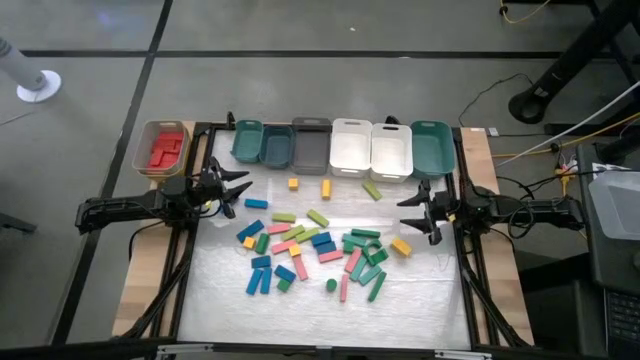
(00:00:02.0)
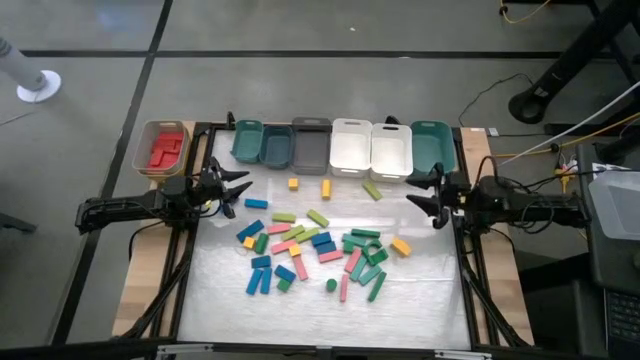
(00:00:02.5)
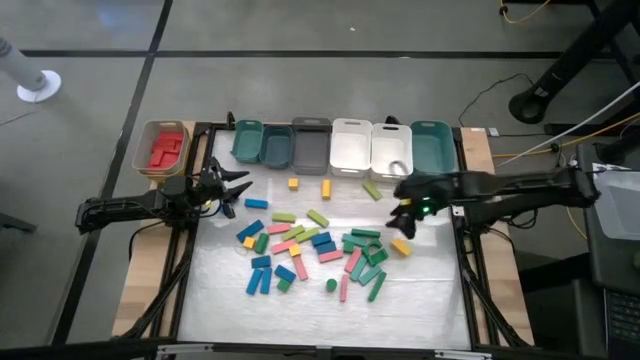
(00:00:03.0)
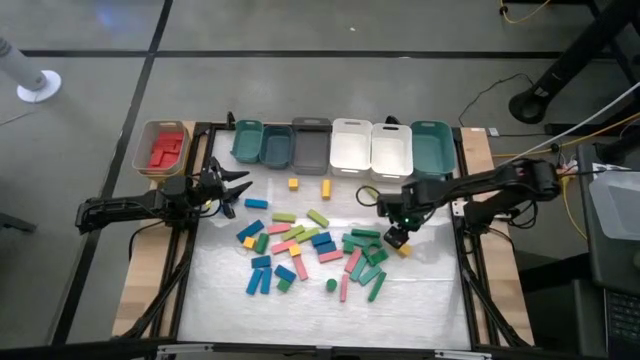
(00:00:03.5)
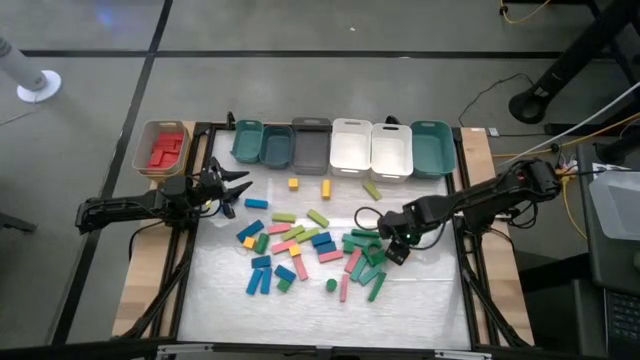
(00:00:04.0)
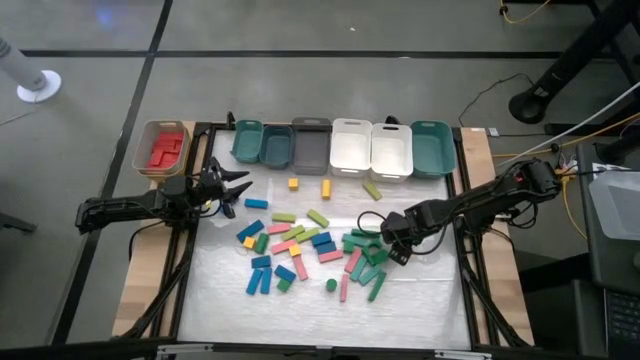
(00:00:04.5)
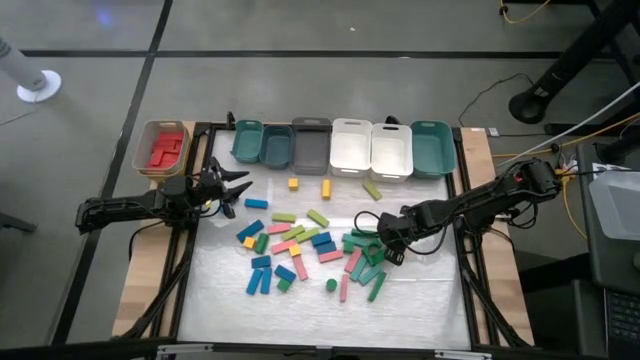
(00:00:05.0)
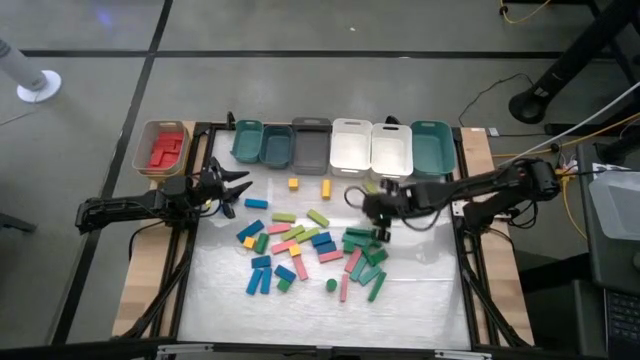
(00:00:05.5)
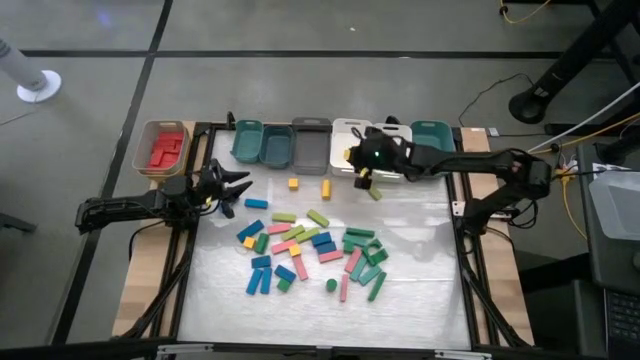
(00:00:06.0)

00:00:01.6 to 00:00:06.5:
Task: Sort blocks
Put the yellow block into the left white bin

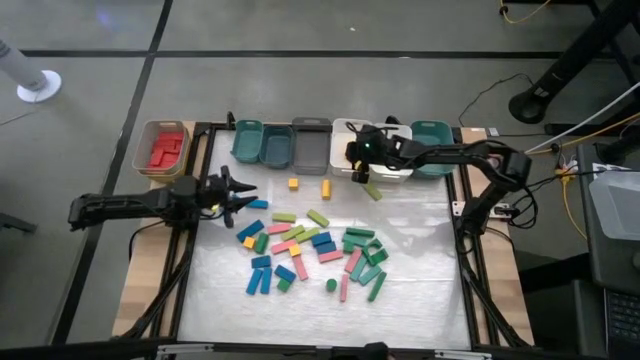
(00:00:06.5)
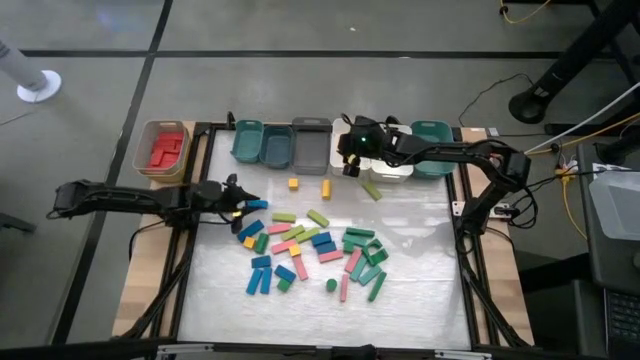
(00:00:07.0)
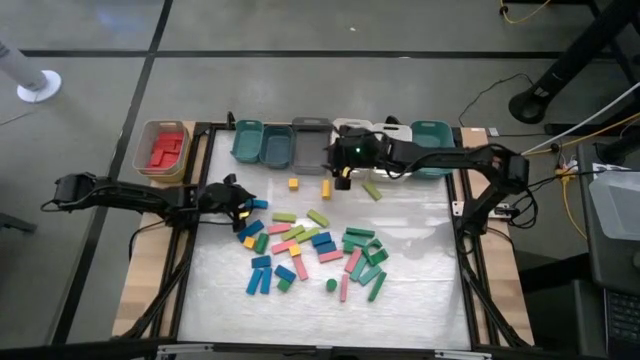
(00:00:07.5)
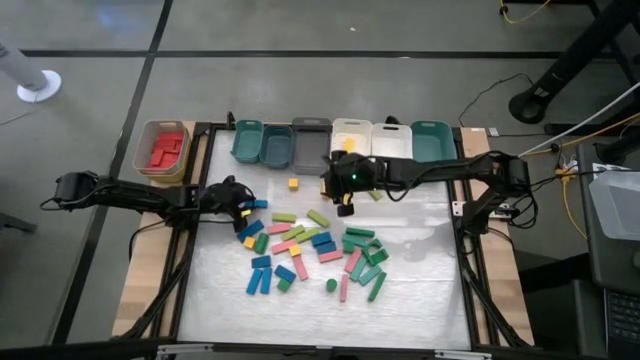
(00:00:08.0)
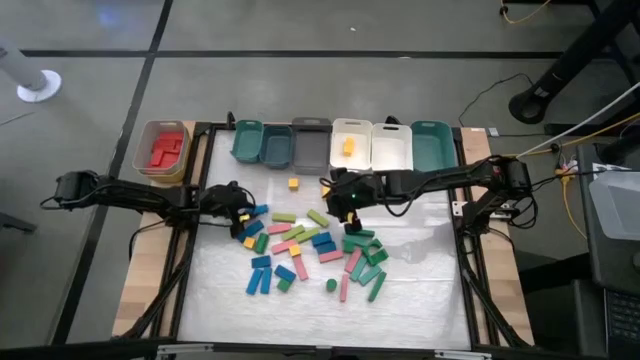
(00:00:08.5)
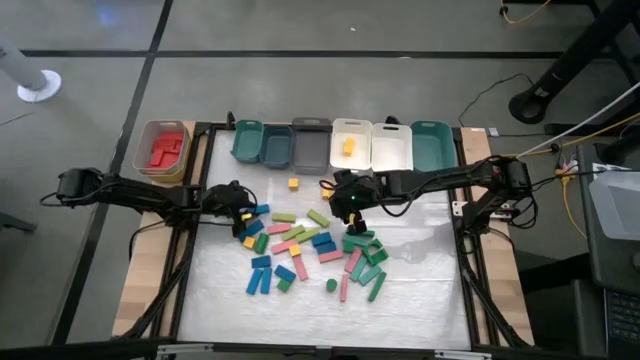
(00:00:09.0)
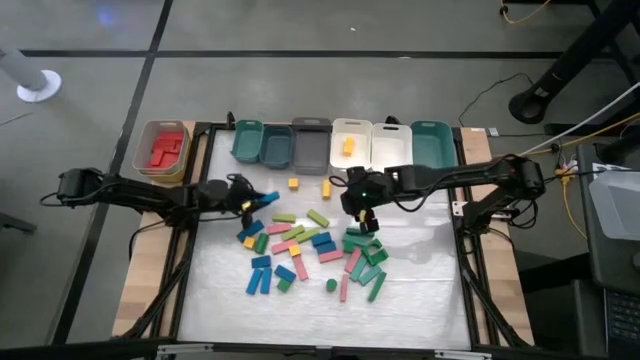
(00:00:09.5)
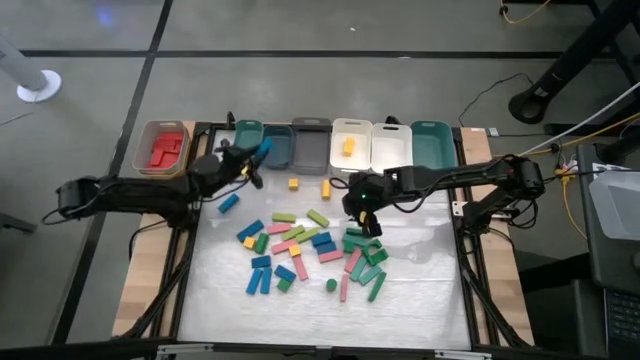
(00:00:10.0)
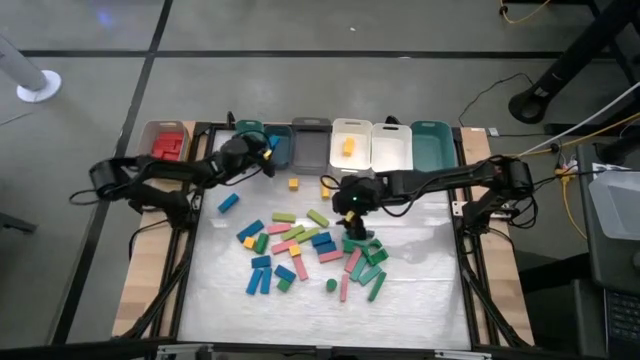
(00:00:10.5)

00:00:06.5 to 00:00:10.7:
Put the blue block into the blue bin

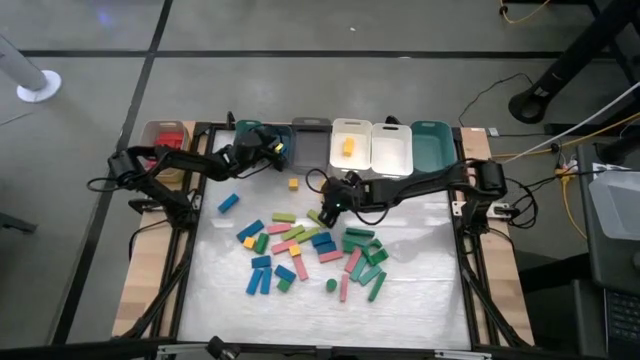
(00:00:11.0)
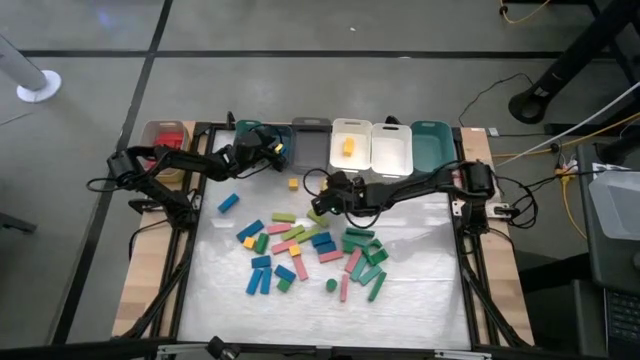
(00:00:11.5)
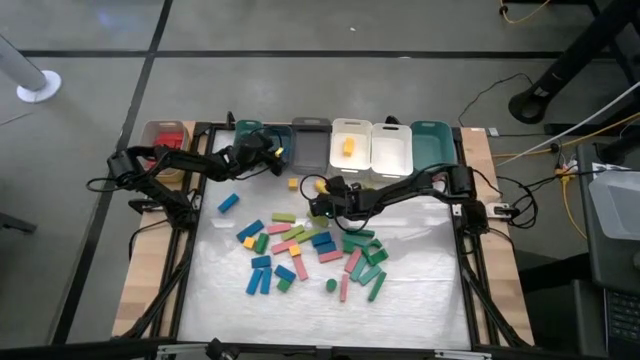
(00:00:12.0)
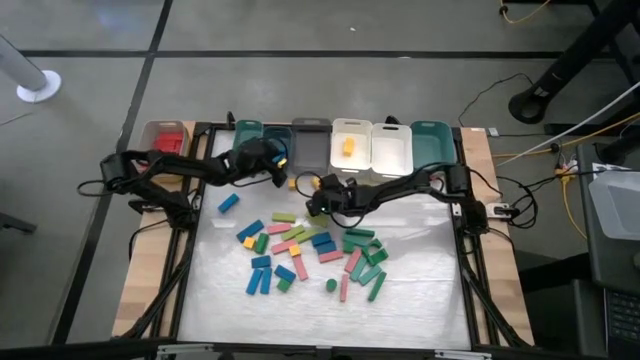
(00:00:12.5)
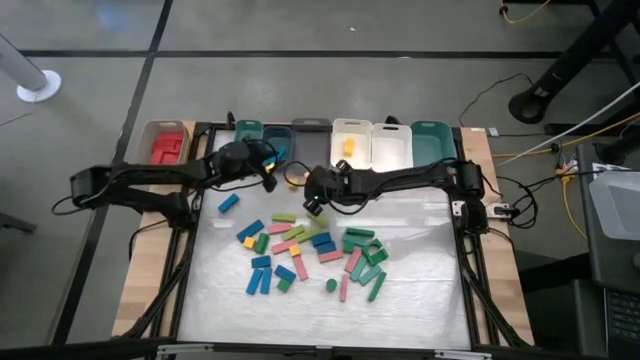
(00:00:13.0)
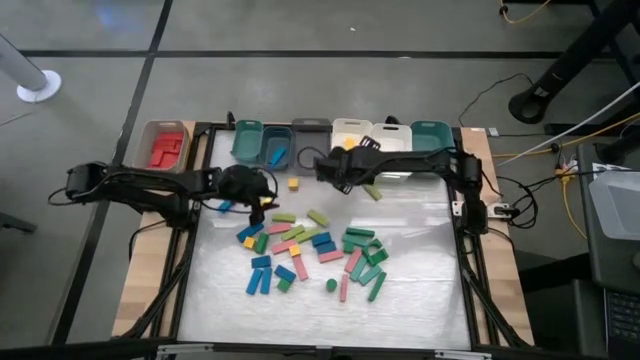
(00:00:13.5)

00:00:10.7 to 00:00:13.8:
Put the yellow block into the left white bin

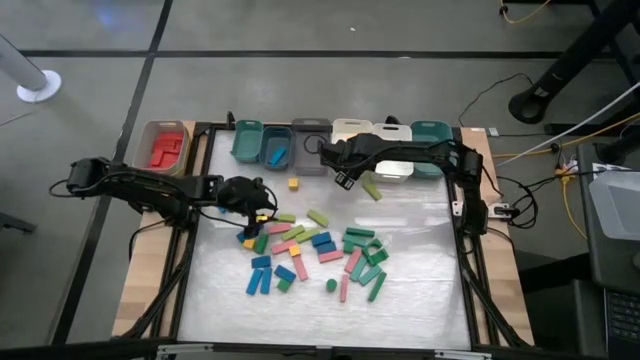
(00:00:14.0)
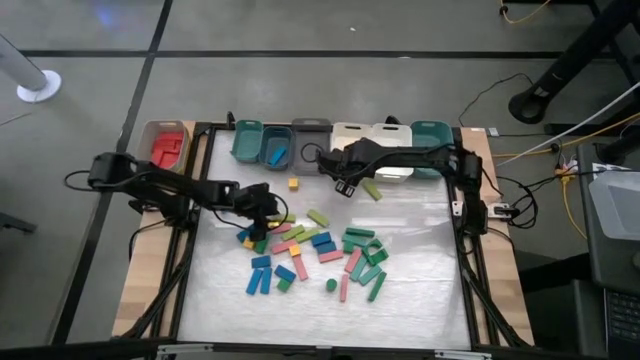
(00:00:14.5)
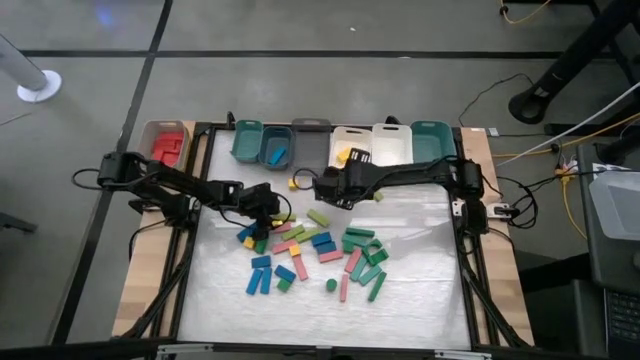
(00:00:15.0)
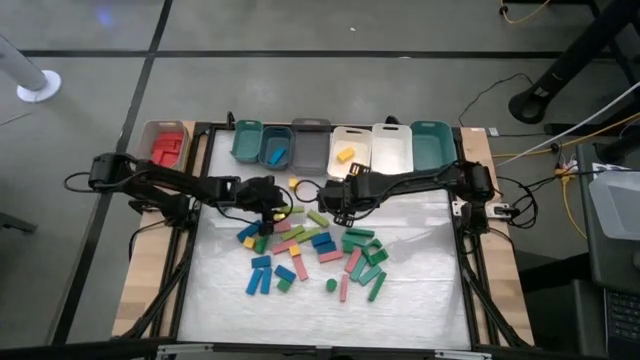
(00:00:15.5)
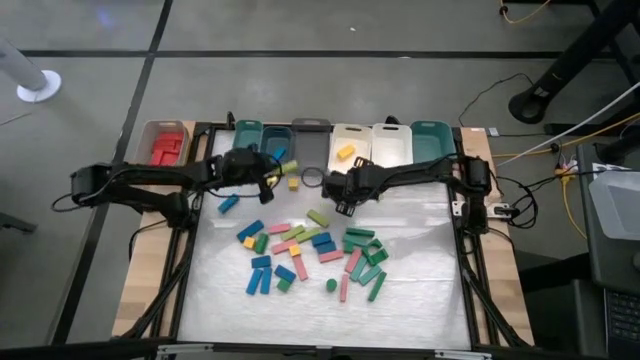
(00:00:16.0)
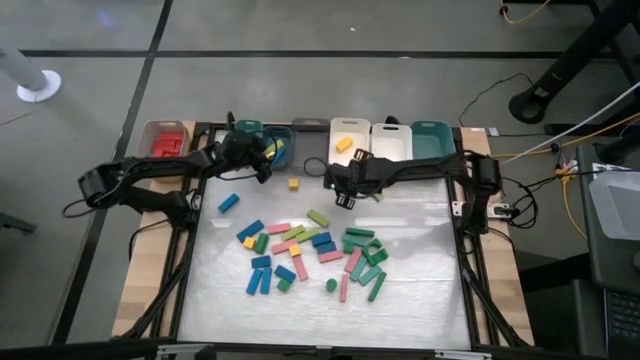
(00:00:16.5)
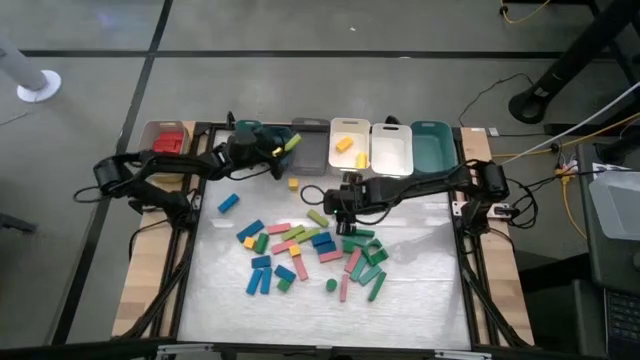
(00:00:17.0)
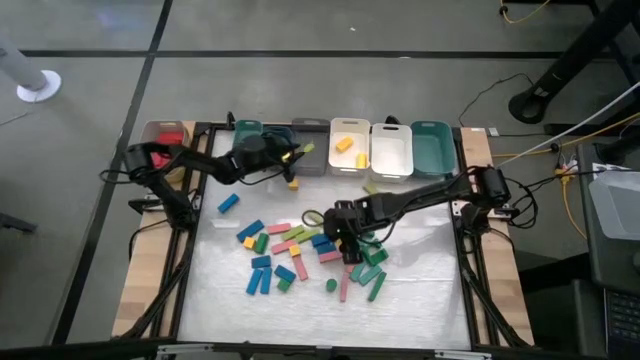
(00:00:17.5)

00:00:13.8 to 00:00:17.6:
Put the light green block into the gray bin

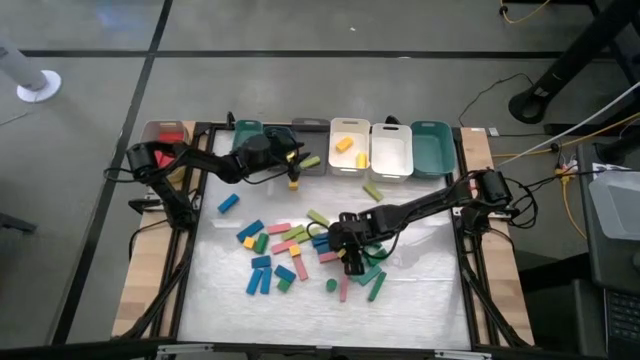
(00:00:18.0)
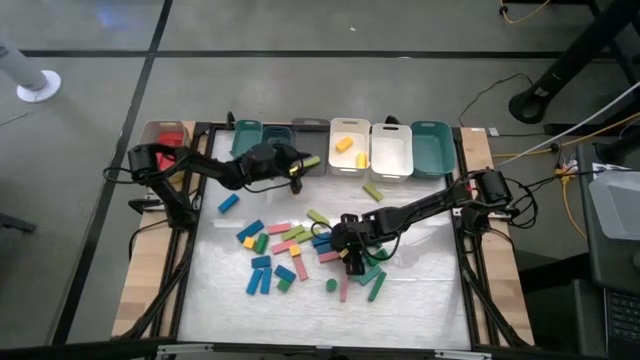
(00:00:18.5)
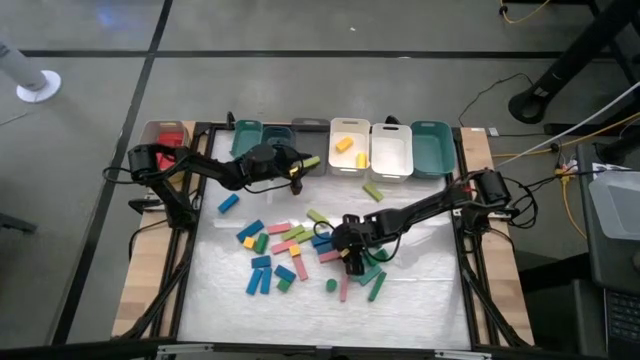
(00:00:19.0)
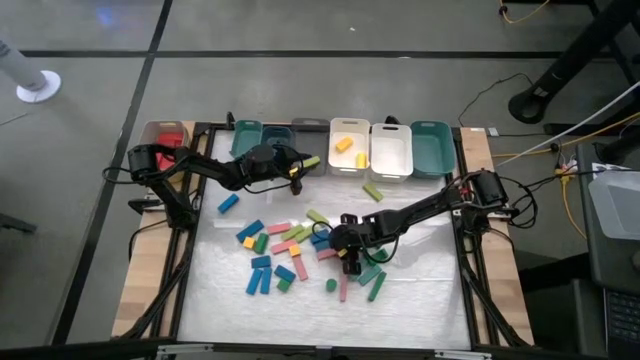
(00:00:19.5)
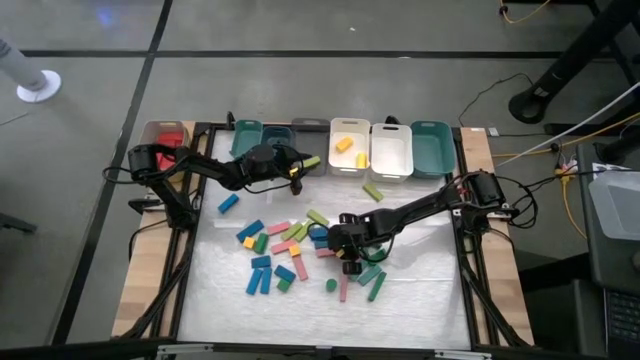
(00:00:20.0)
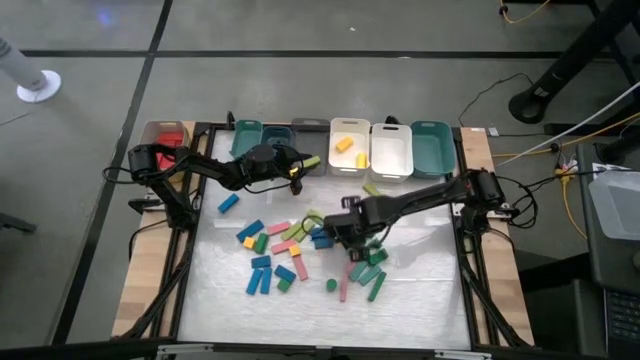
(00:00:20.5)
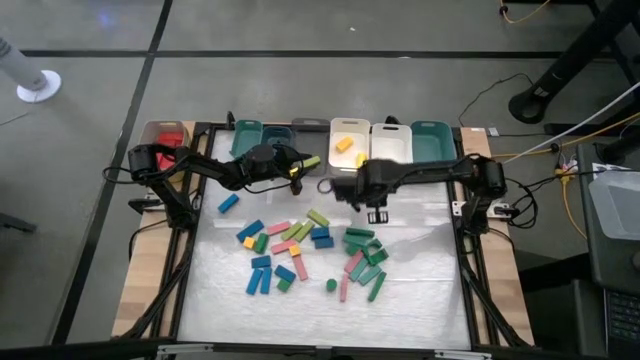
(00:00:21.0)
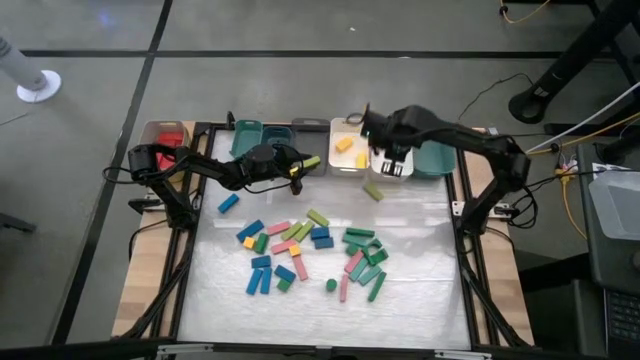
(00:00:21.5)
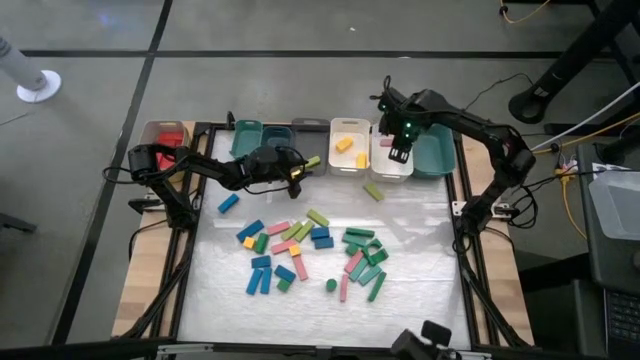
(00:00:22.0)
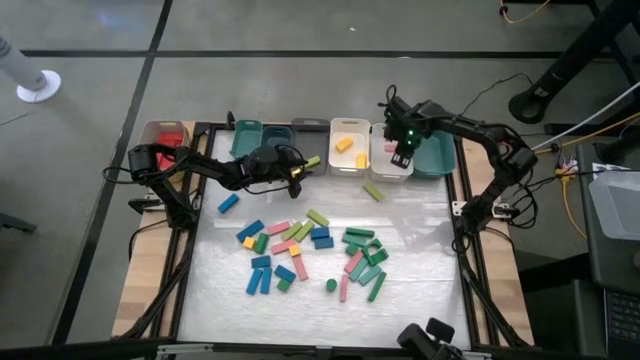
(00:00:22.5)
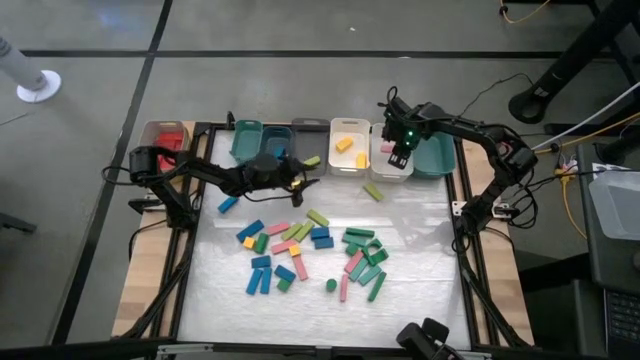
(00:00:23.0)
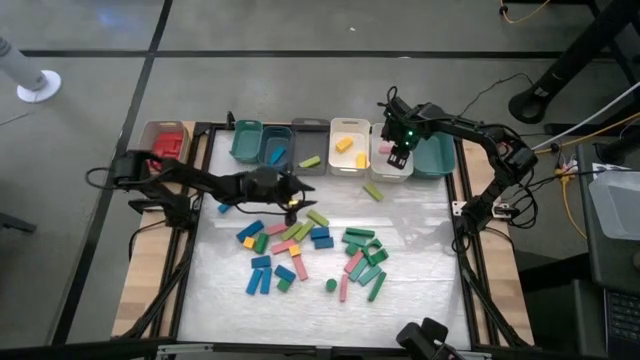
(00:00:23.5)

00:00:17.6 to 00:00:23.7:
Put the pink block into the right white bin
